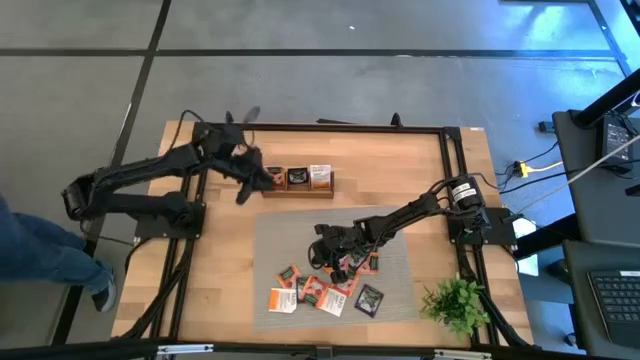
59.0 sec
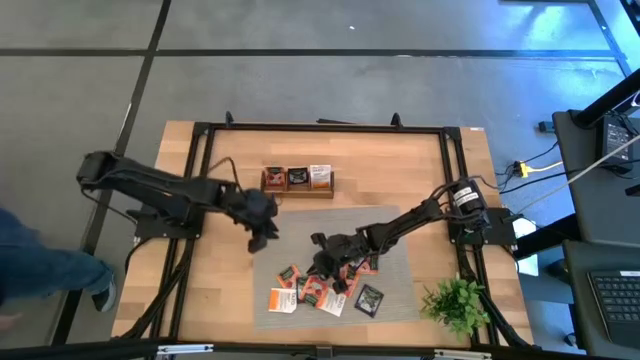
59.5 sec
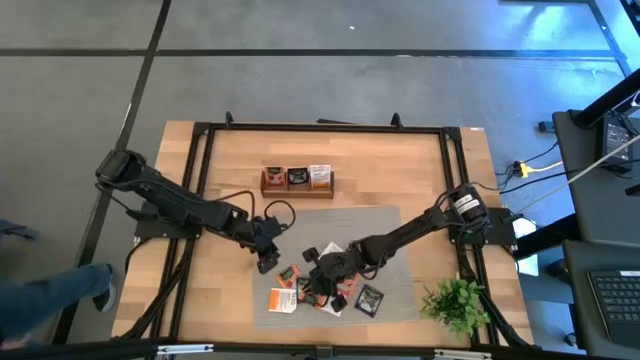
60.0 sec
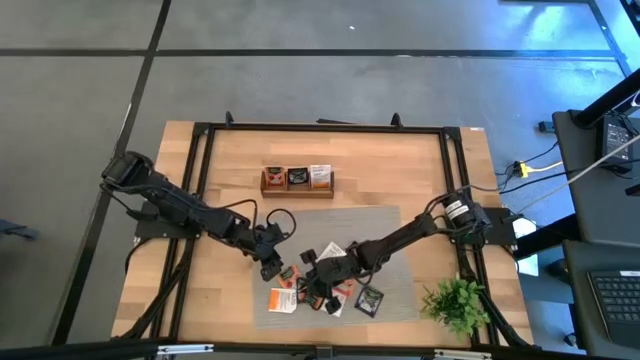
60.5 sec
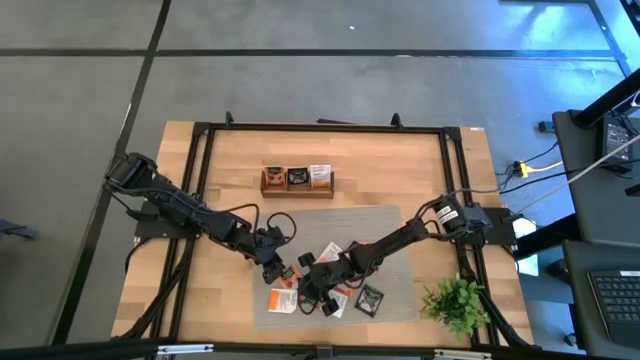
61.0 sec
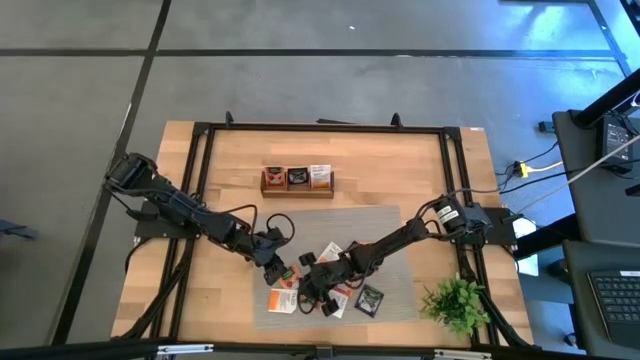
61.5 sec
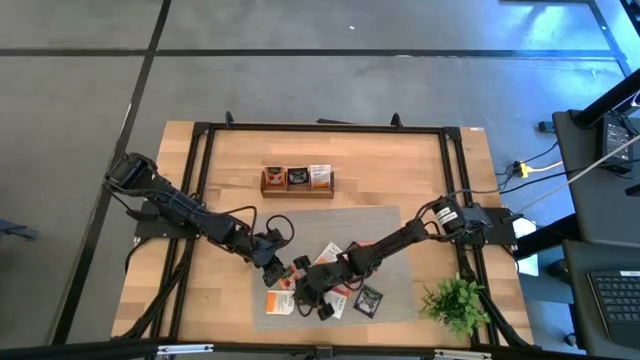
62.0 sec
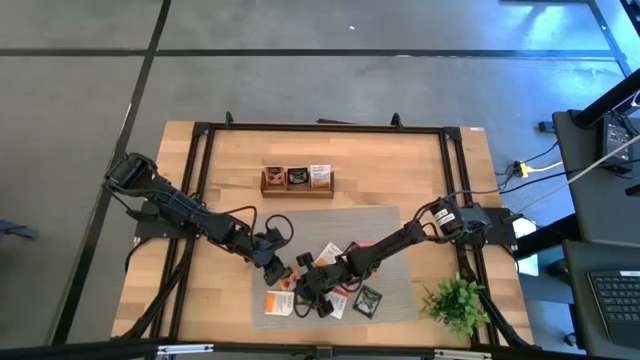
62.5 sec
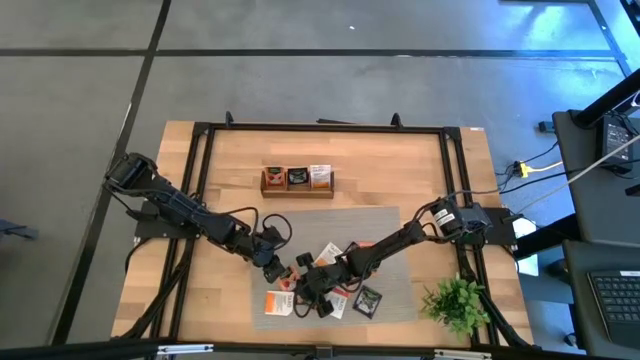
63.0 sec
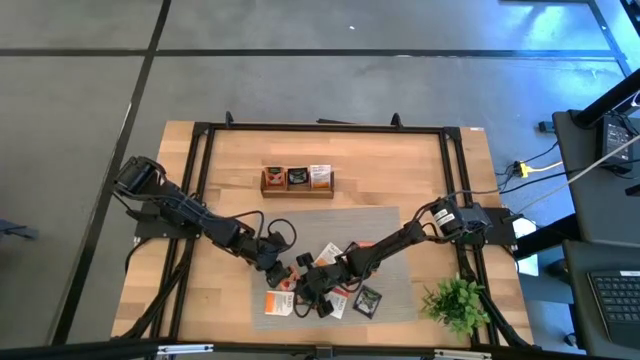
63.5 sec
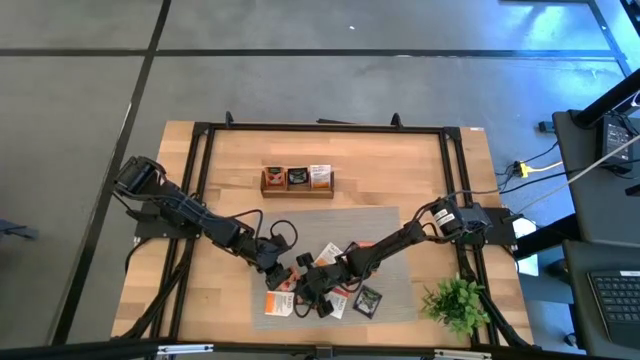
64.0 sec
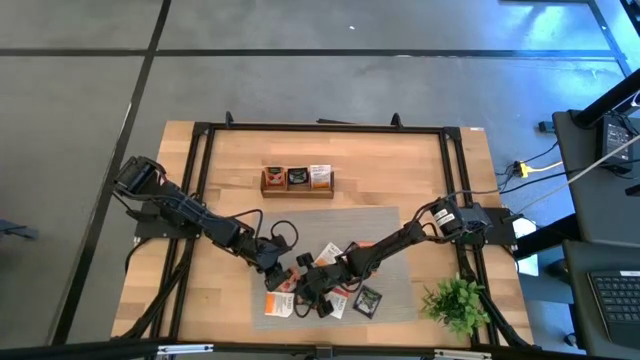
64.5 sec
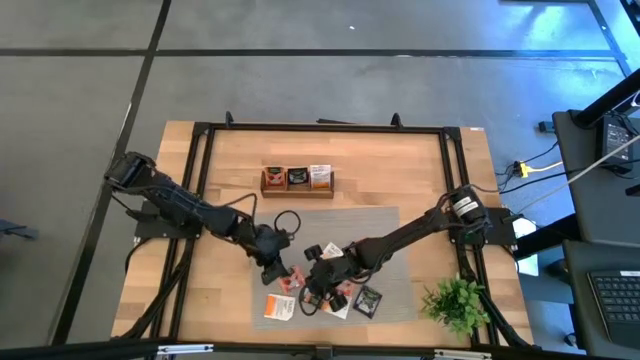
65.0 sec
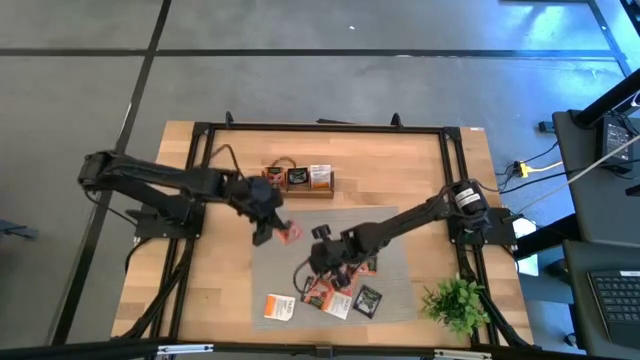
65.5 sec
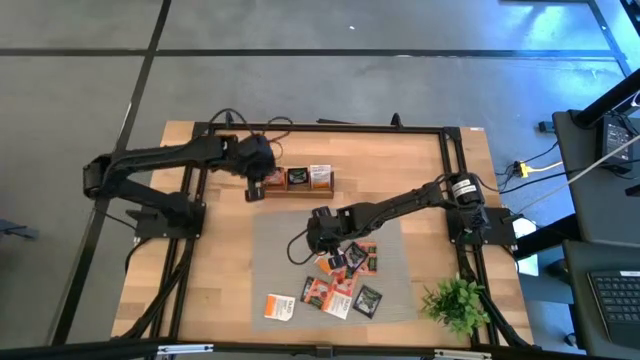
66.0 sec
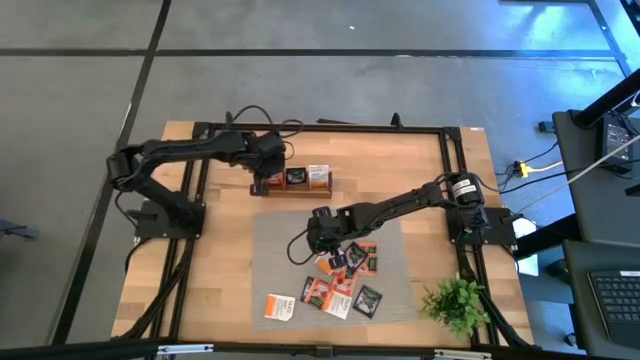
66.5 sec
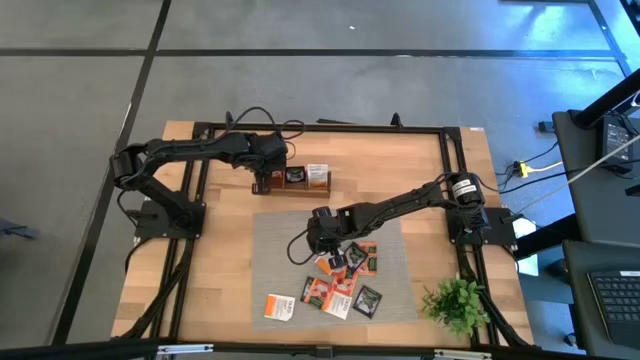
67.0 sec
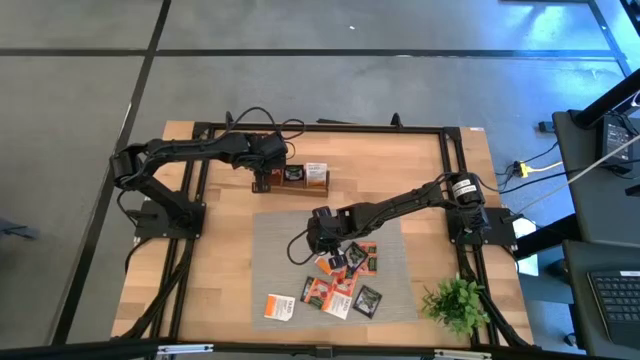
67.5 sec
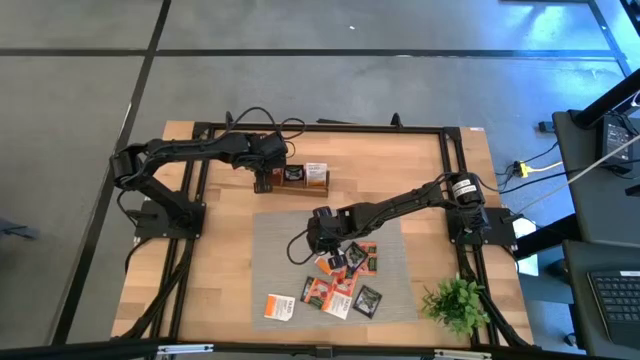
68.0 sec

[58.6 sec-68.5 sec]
Task: Pick & Place Tea
Put the orange tea bag into the left section of the wooden organizer

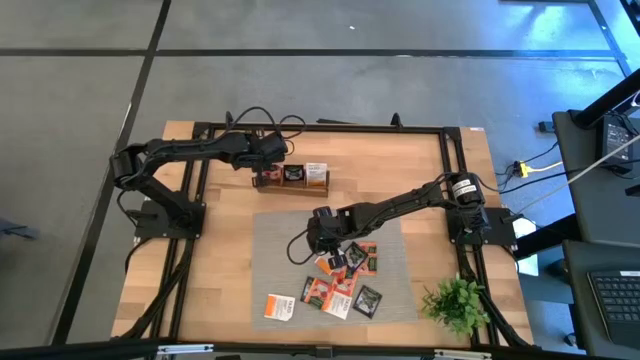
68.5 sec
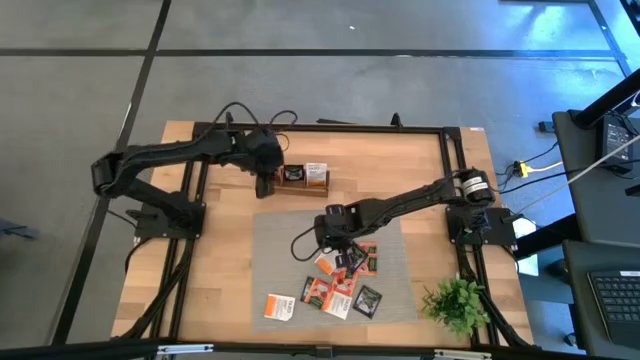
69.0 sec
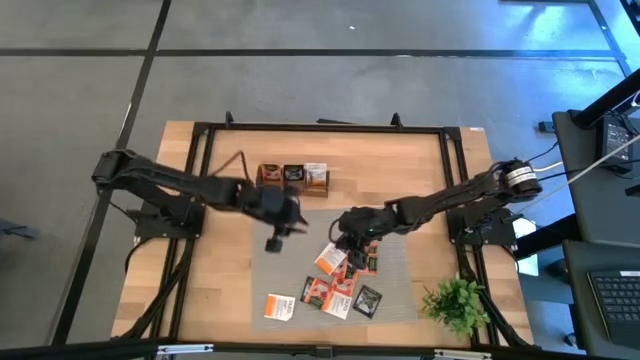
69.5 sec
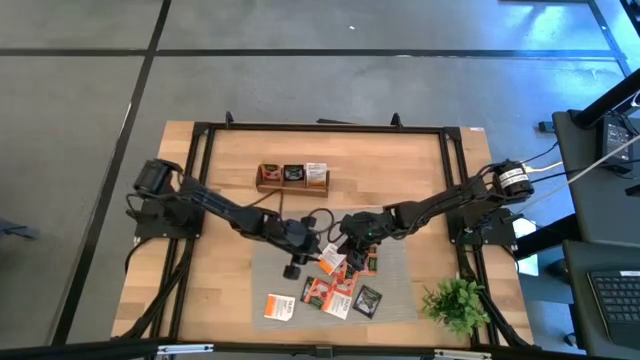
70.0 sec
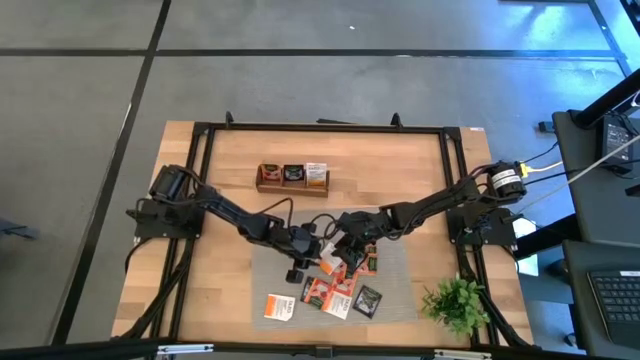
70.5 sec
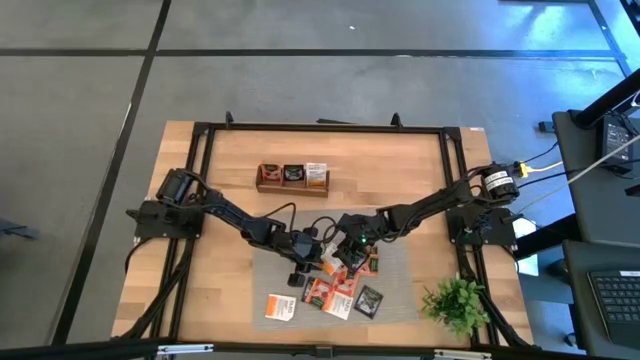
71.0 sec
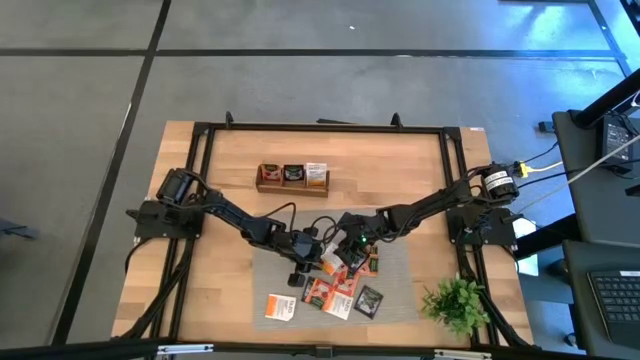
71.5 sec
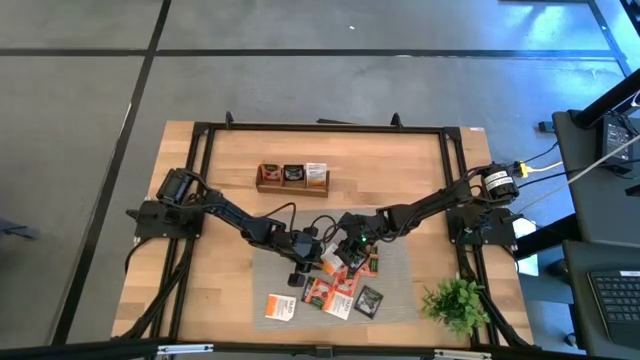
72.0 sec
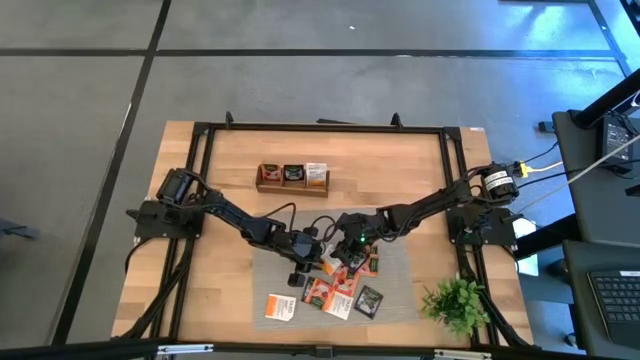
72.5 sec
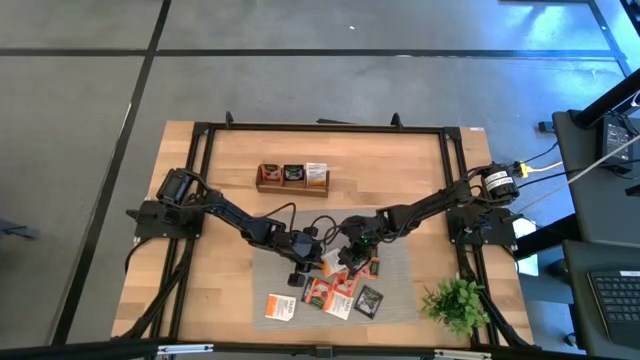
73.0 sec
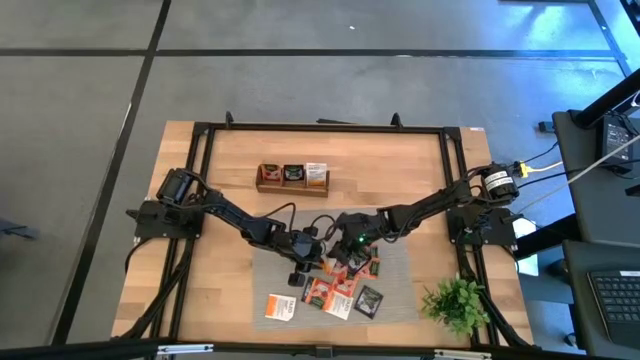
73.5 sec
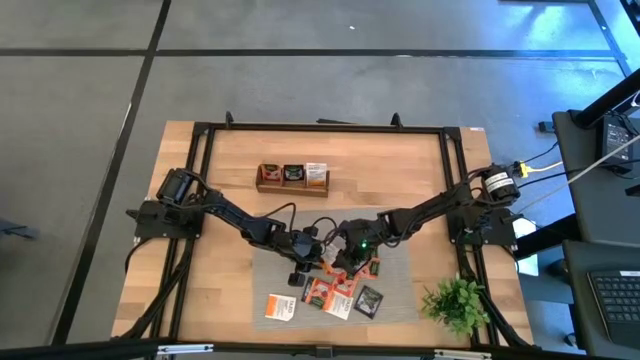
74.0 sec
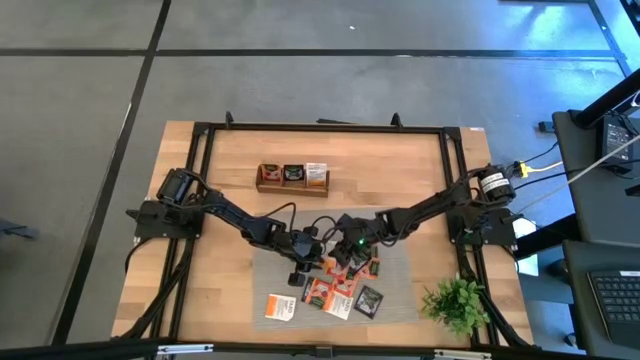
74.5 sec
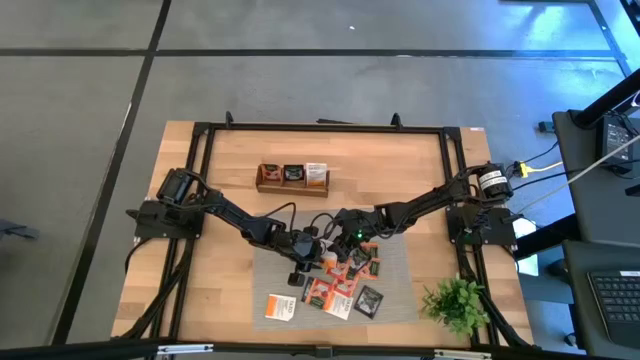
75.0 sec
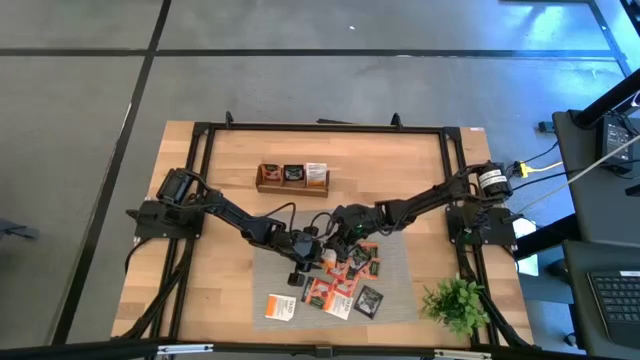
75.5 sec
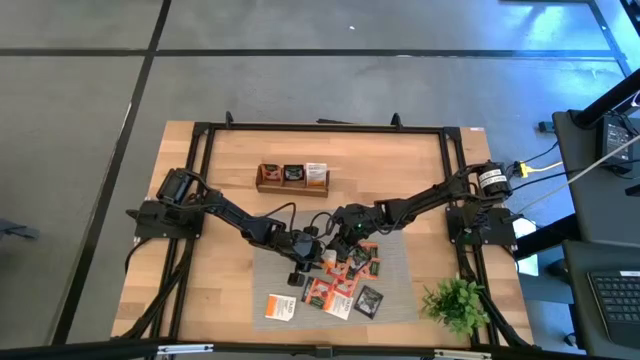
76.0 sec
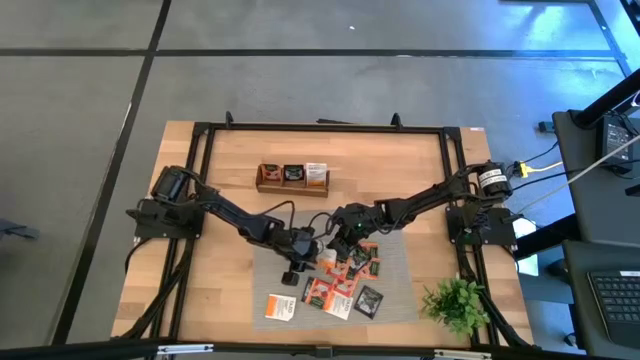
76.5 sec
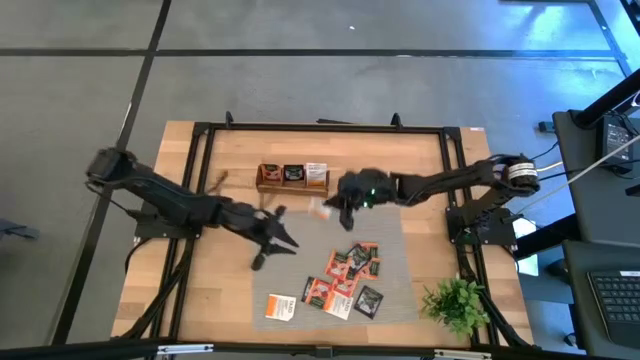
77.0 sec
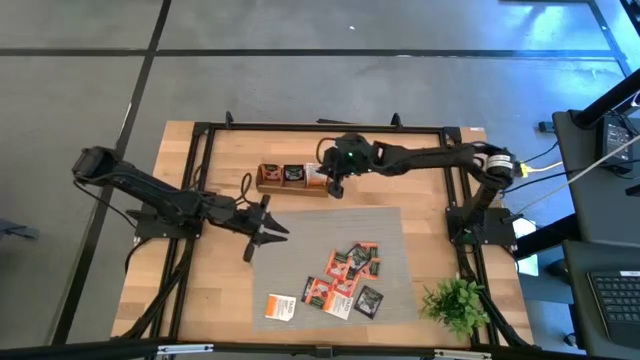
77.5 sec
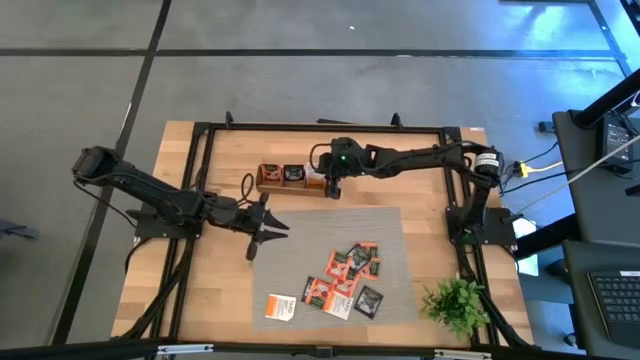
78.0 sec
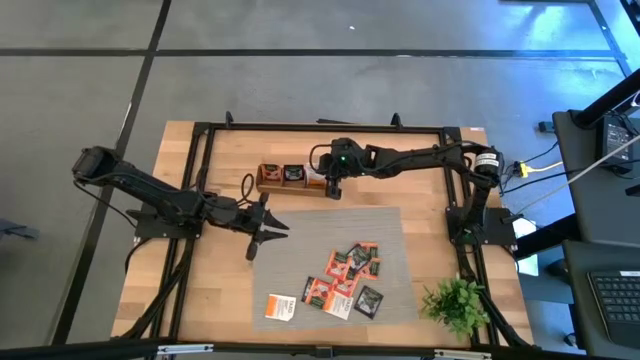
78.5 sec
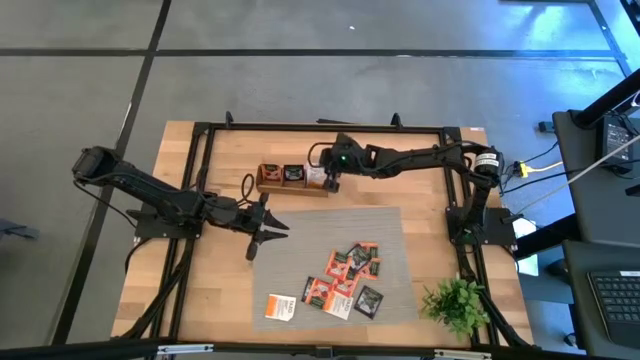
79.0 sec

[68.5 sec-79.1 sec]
Put the white orange tea bag into the right section of the wooden organizer

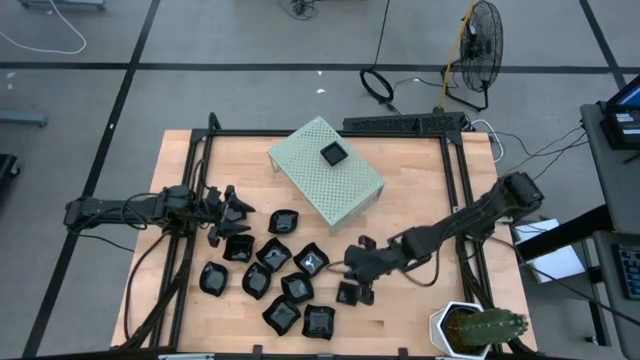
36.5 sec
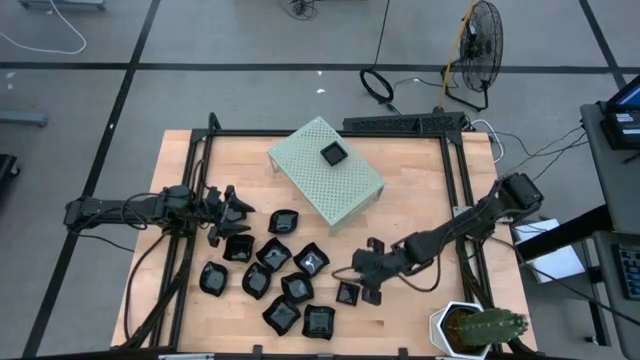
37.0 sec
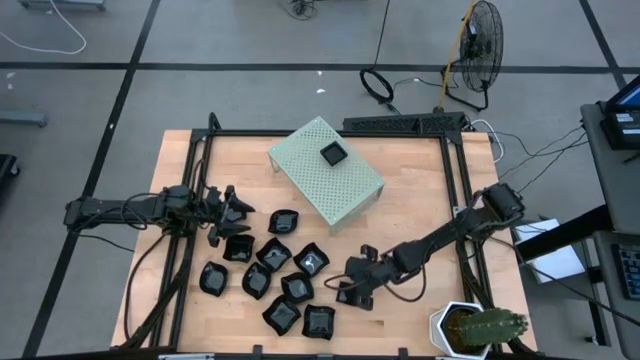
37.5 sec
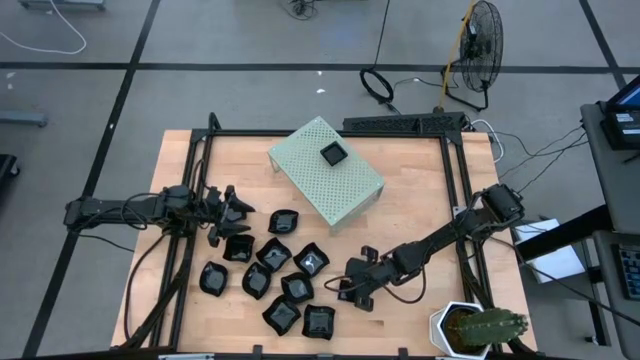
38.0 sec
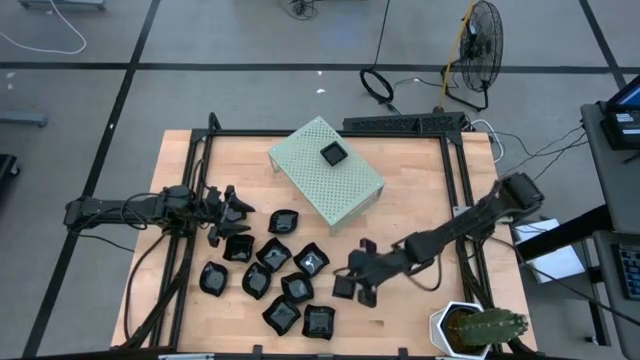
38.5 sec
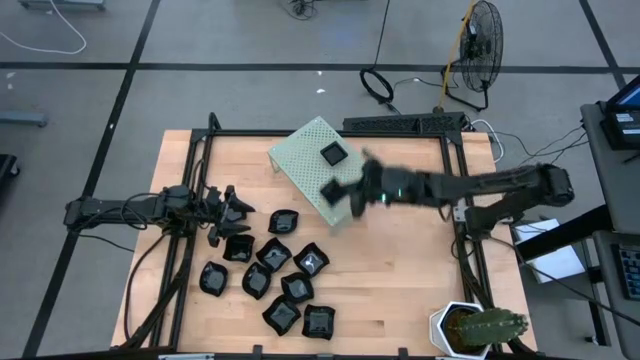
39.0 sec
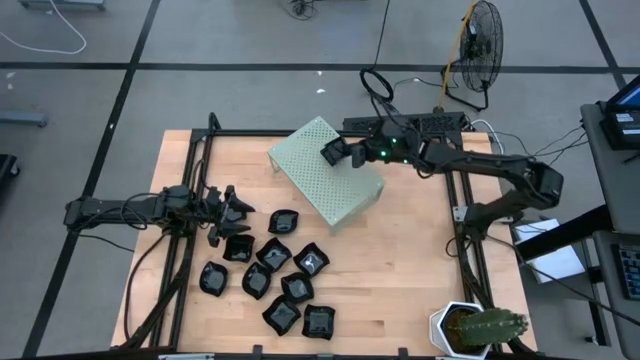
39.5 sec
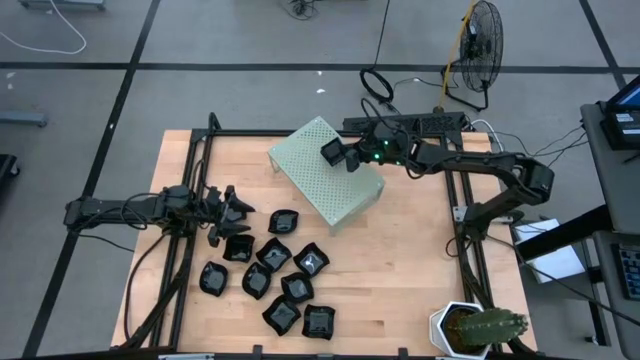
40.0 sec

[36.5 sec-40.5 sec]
Task: Pick & Place Mini shaped plates
Stack the square plate on top of the other square plate on the shelf
